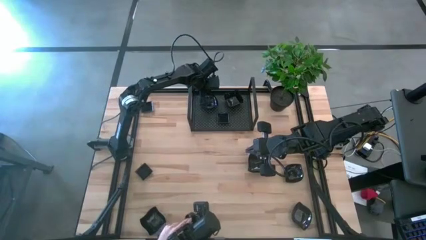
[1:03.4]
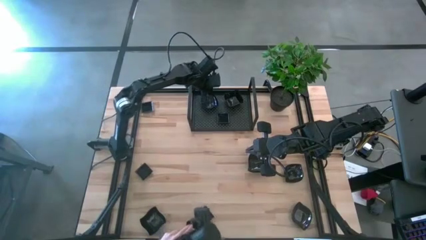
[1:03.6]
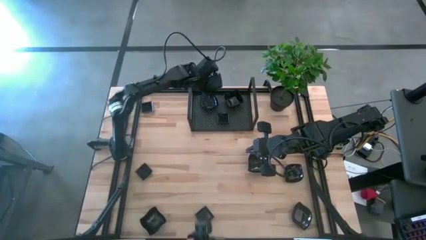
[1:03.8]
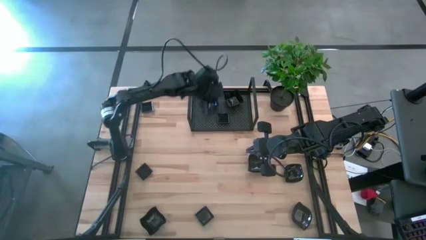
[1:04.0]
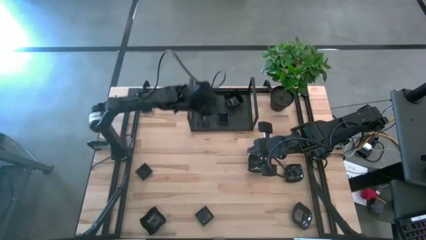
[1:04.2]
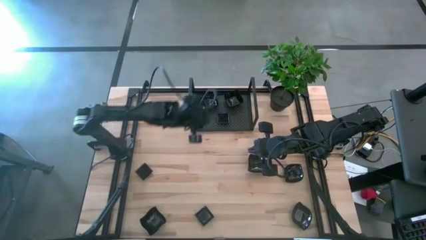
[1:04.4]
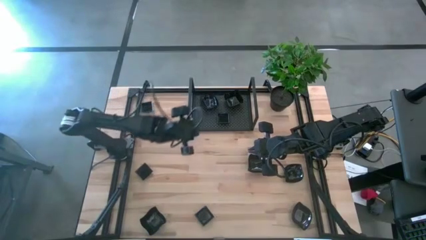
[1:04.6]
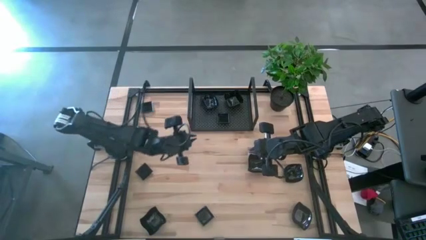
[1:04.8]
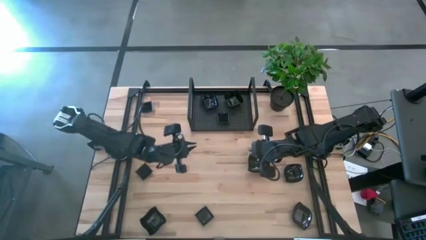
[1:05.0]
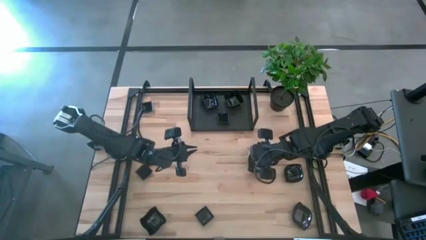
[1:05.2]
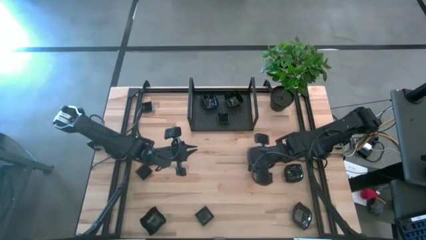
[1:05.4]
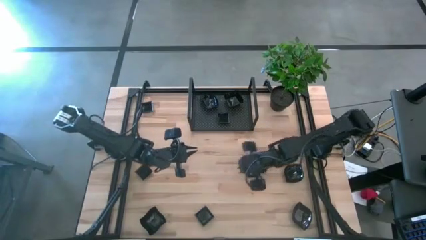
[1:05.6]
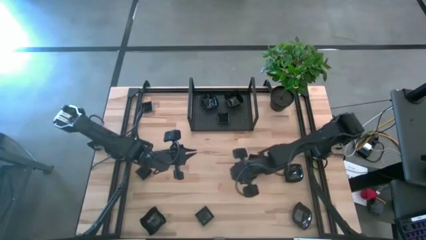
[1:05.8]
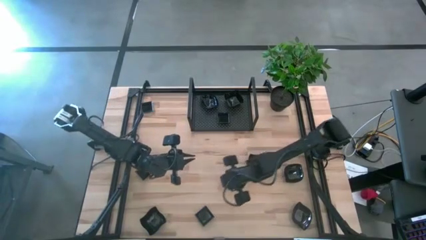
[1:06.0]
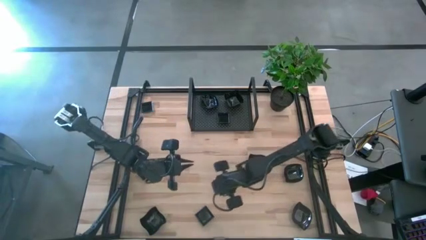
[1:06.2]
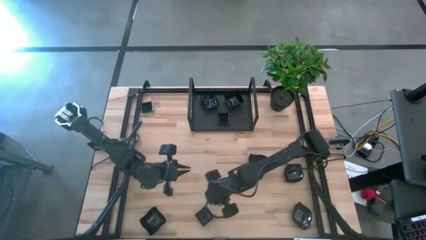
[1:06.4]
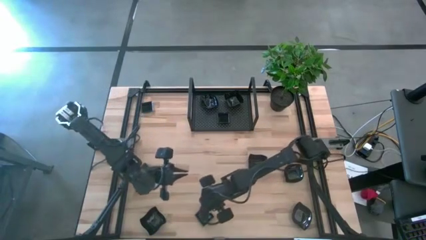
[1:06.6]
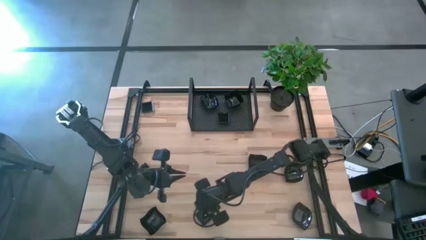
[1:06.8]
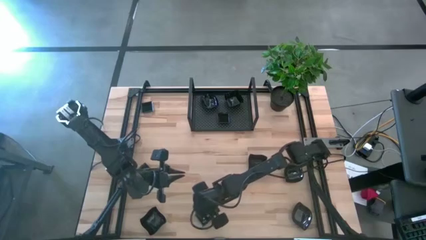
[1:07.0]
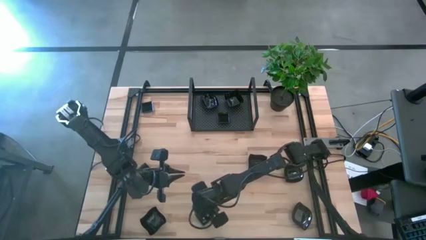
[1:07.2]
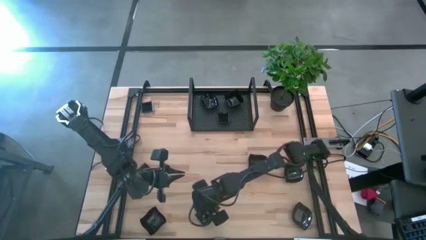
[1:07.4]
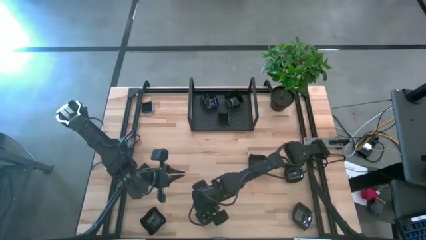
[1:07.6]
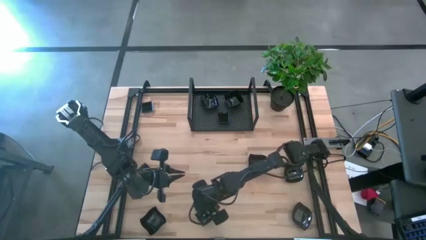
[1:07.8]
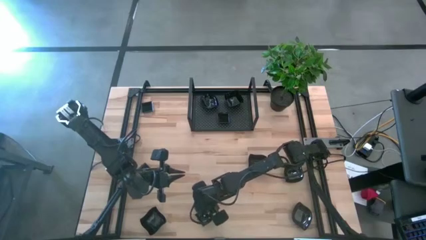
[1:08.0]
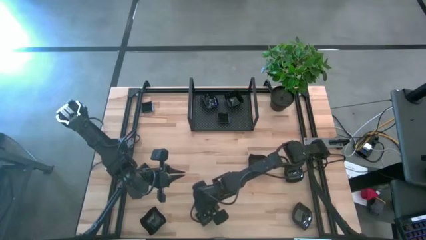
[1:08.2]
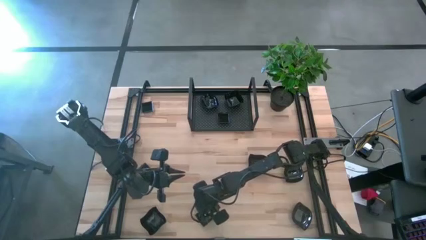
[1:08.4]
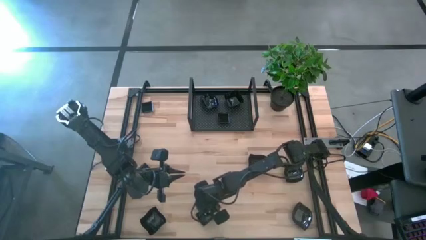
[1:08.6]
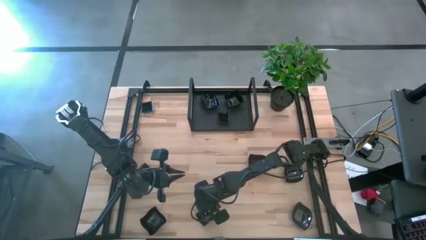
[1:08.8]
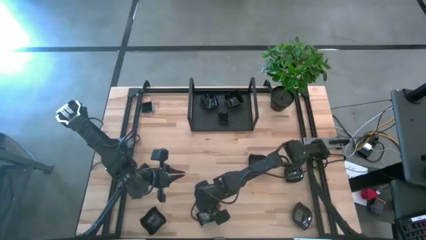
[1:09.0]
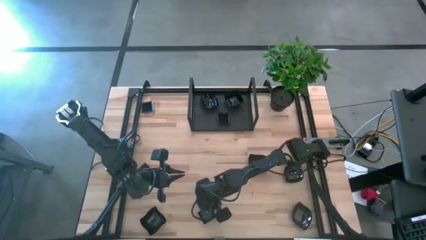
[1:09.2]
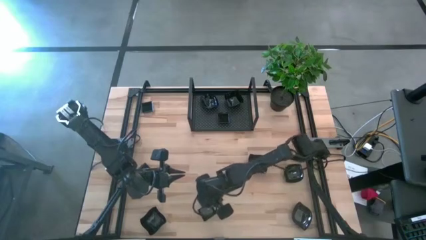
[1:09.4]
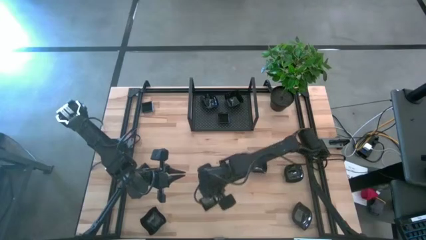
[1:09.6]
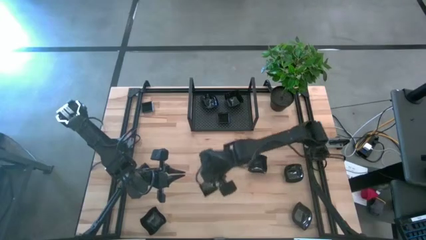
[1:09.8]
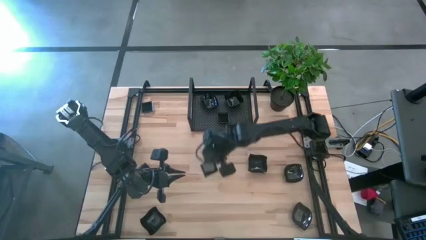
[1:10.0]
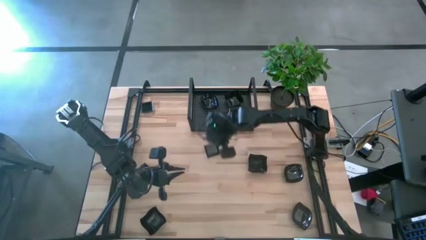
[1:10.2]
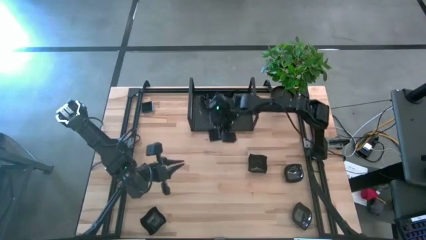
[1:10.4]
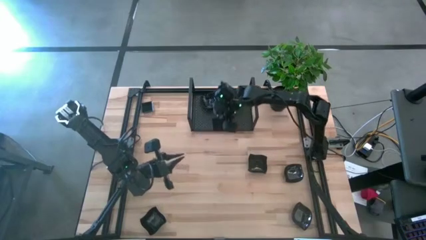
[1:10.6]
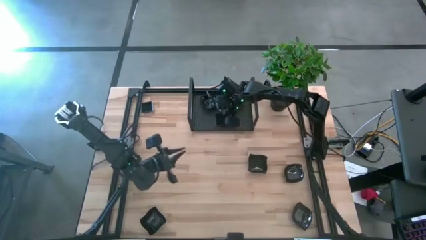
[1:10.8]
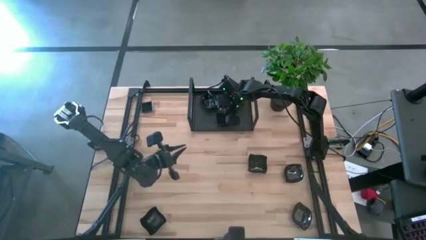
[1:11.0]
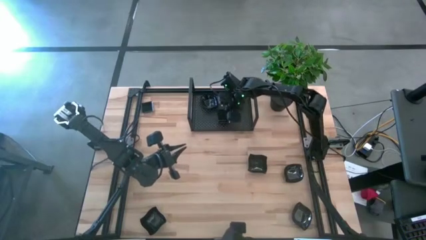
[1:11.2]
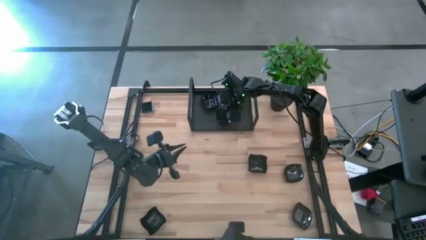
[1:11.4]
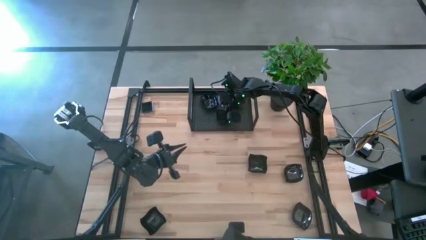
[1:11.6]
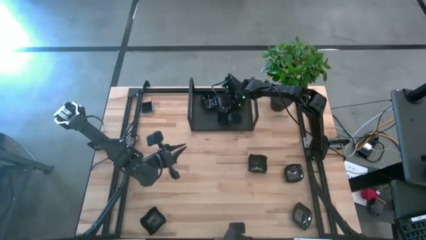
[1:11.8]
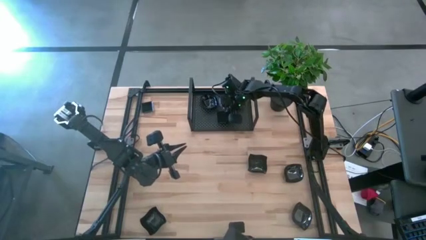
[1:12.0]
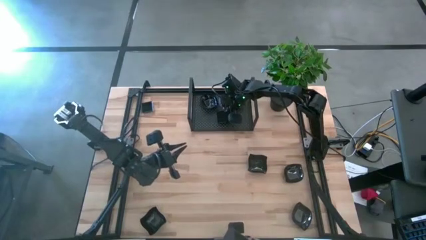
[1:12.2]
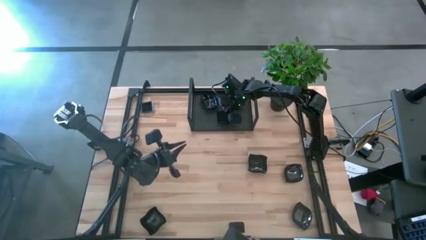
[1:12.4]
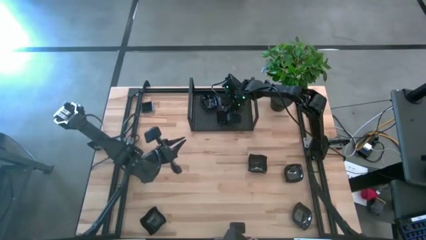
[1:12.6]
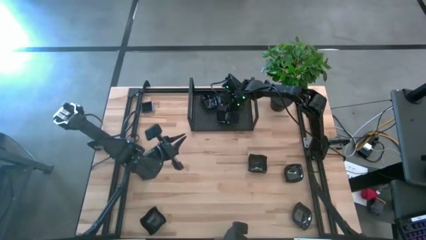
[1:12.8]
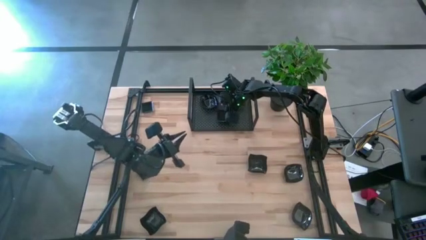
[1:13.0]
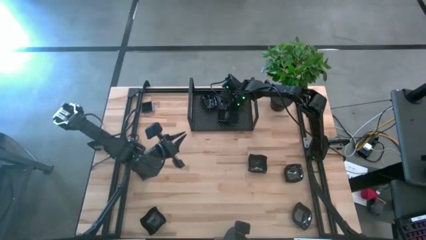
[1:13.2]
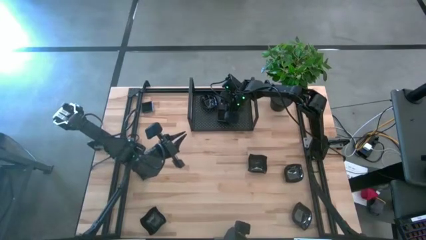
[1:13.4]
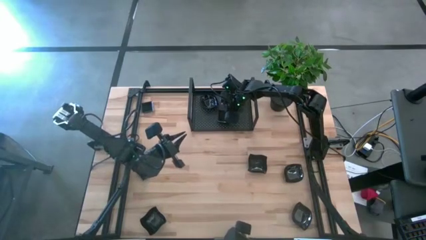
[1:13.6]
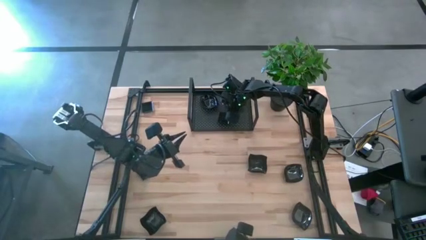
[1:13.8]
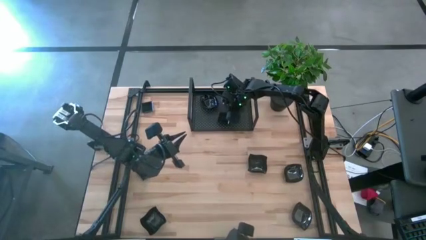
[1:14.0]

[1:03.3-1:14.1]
Task: Pick & Place Mini shaped plates
Stack the black square plate on top of the black square plate on the shelf

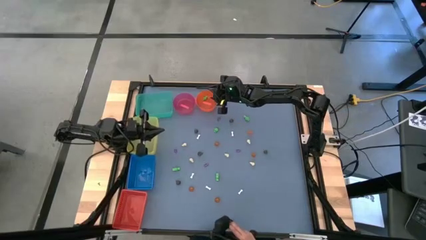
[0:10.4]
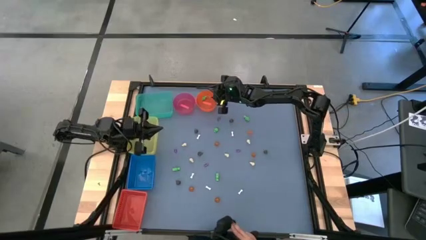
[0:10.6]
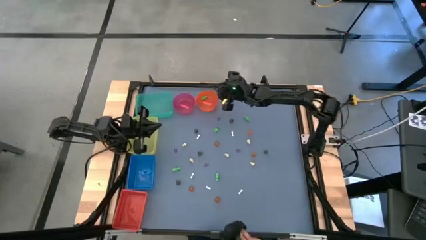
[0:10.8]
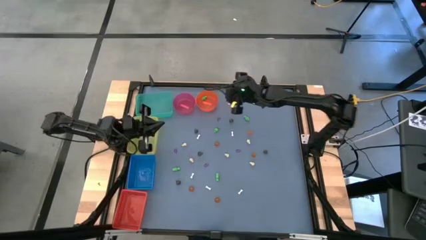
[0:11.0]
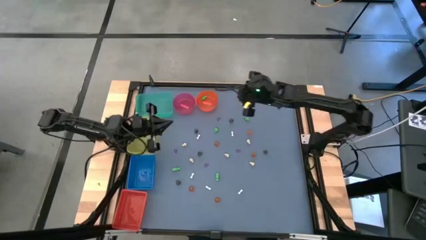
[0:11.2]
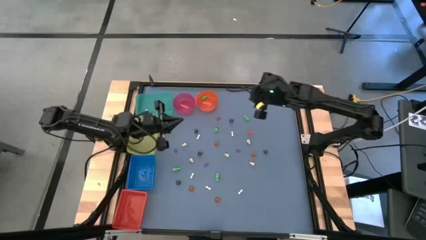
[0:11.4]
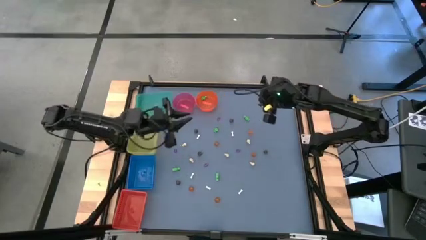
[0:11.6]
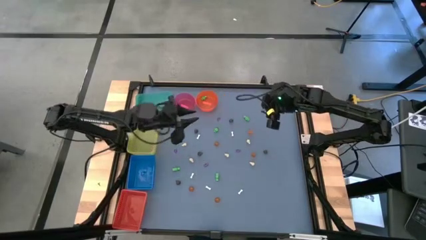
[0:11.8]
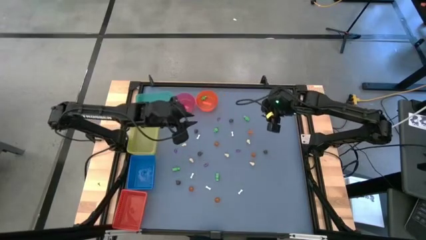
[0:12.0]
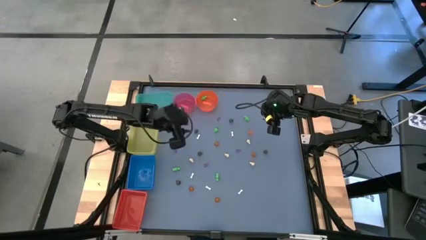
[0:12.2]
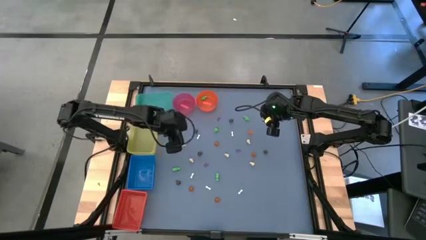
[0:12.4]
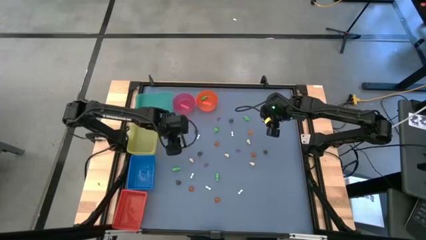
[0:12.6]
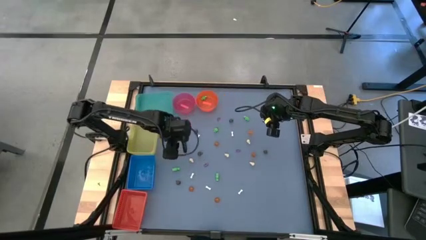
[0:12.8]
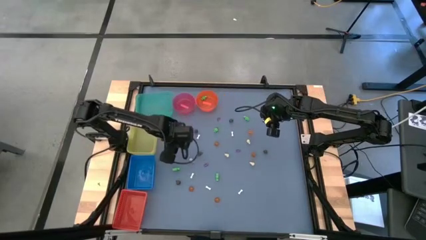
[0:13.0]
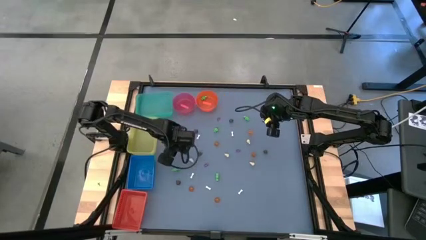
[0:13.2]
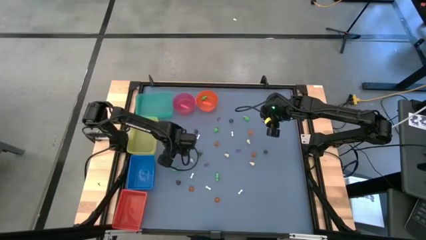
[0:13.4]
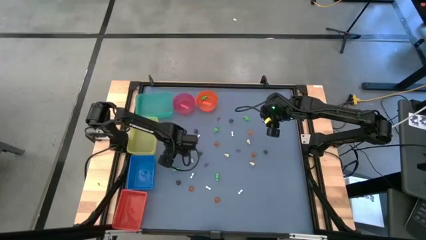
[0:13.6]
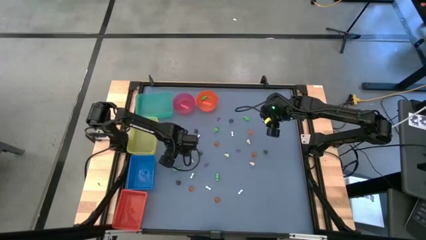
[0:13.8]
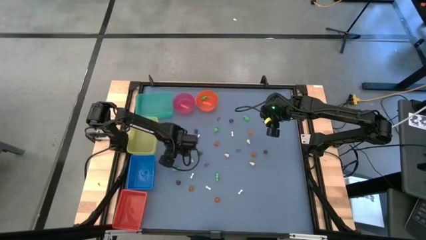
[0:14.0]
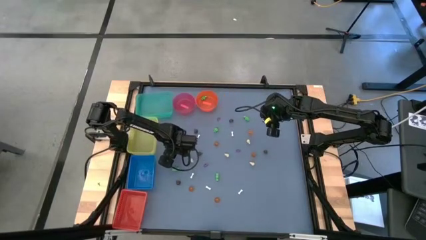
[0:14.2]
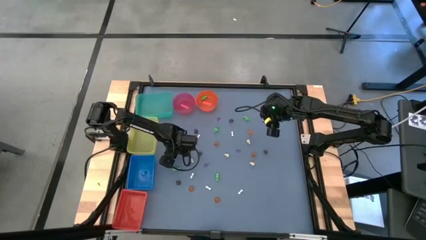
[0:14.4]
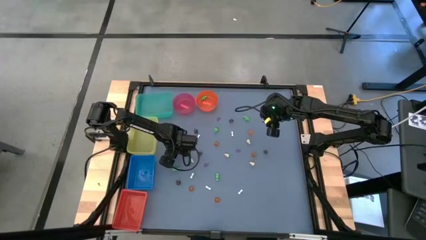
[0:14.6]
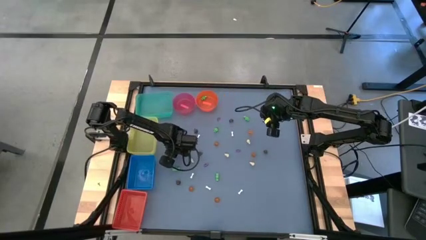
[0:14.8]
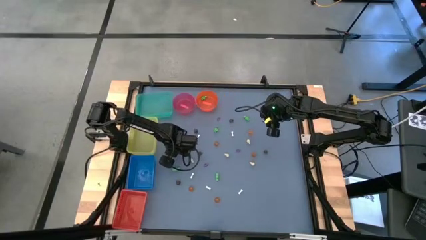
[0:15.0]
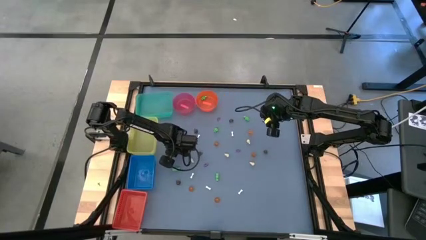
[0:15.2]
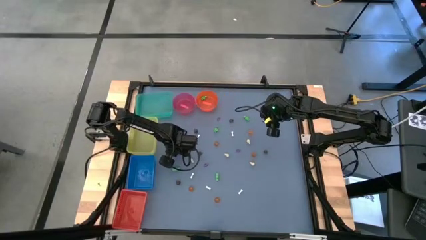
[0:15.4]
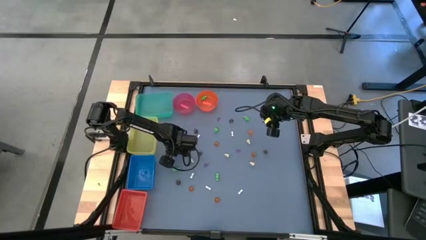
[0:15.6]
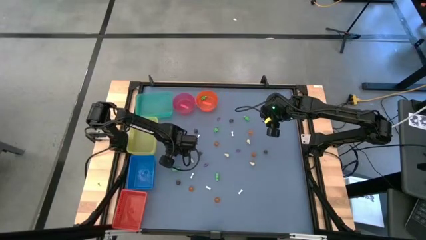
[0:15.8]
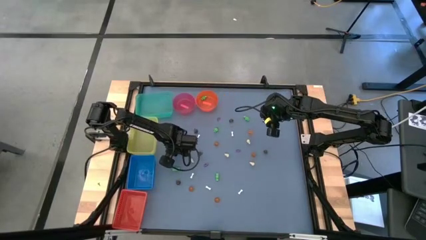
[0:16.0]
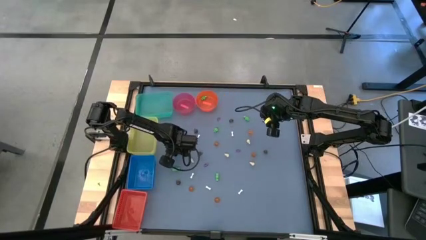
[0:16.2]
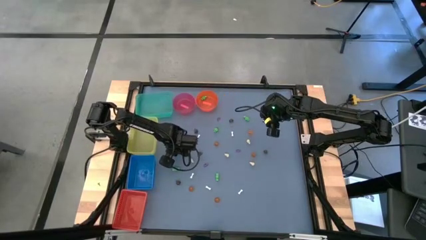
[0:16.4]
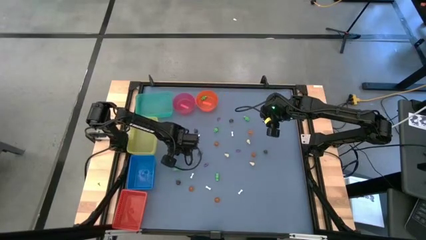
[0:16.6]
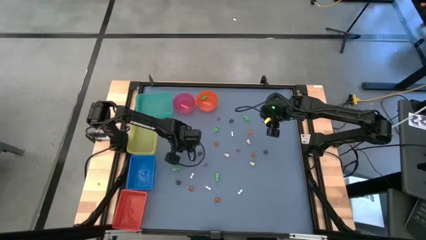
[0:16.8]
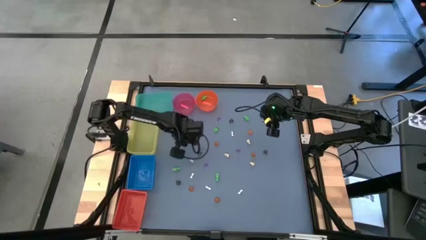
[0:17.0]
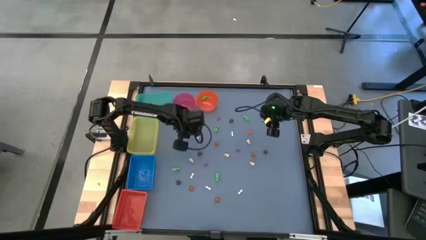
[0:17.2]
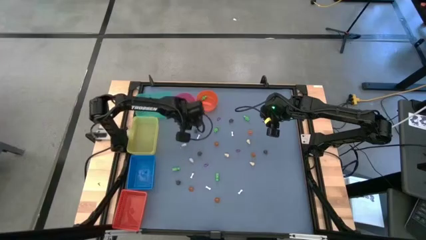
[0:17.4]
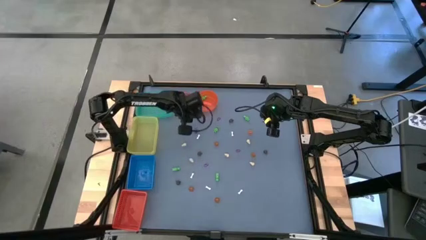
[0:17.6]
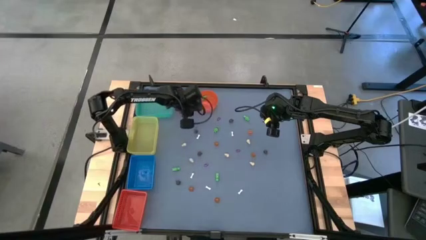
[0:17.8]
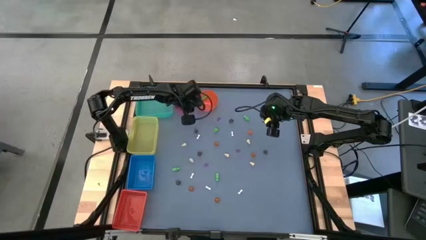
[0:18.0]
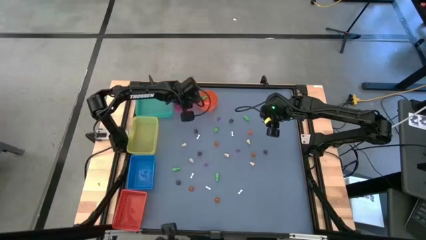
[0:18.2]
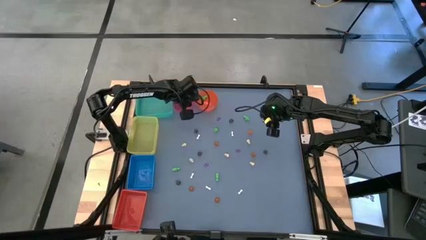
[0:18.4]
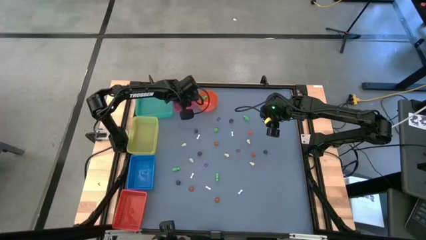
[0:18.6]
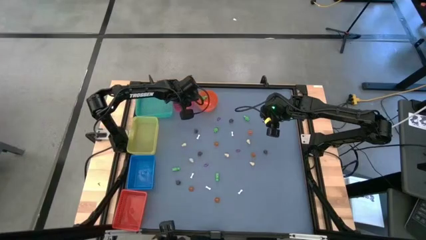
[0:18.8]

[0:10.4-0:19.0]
Task: Sort Halloween decoration
Put the purple witch hat toy into the pink bin
